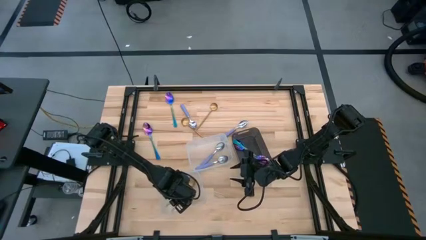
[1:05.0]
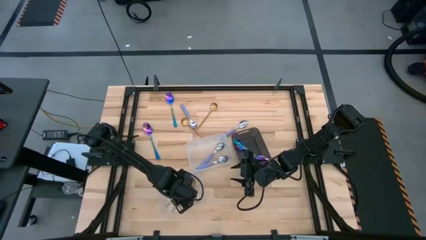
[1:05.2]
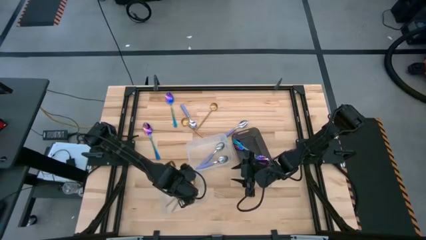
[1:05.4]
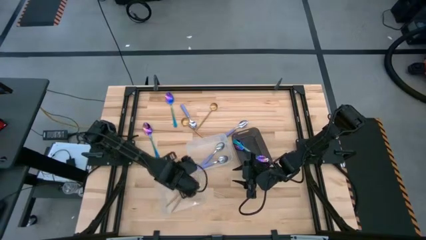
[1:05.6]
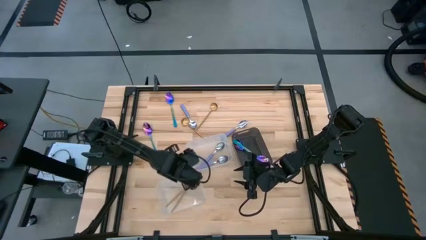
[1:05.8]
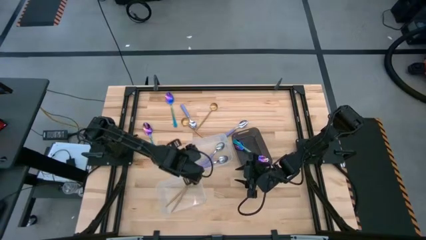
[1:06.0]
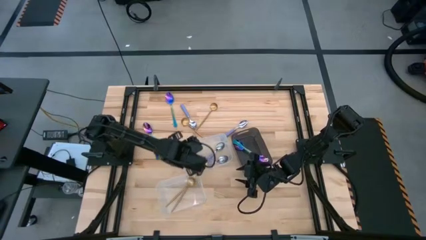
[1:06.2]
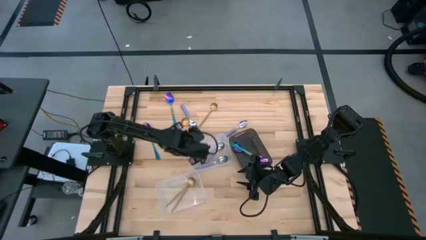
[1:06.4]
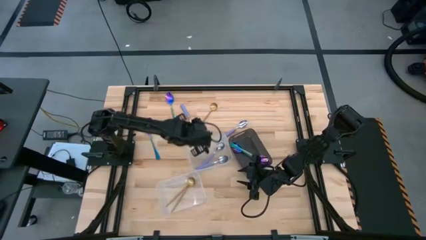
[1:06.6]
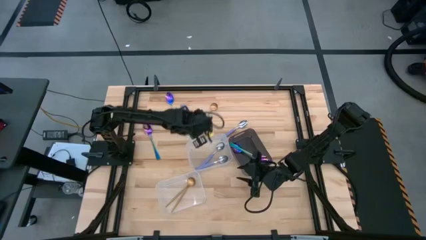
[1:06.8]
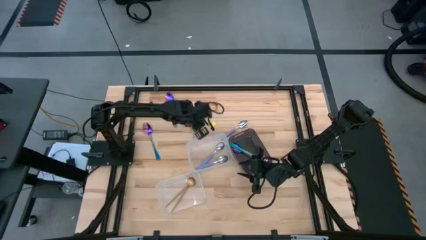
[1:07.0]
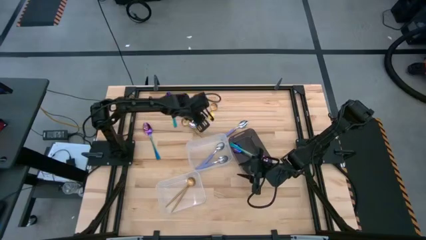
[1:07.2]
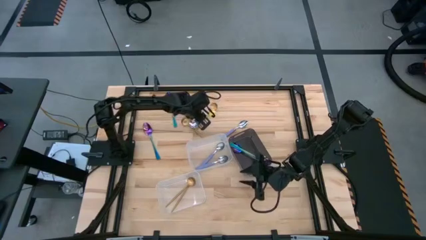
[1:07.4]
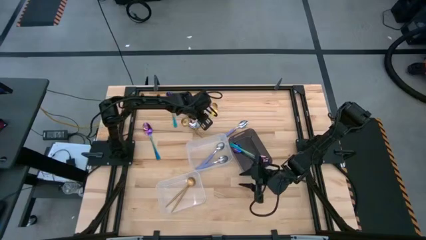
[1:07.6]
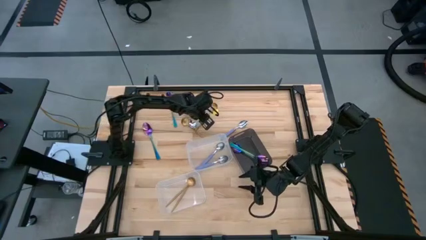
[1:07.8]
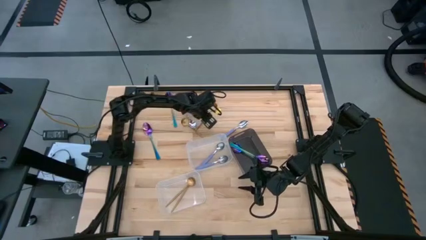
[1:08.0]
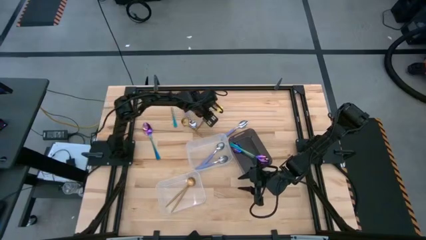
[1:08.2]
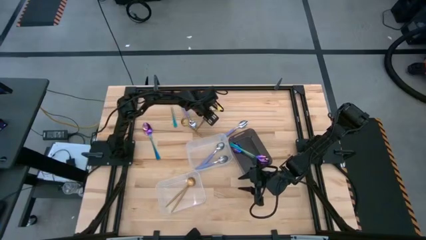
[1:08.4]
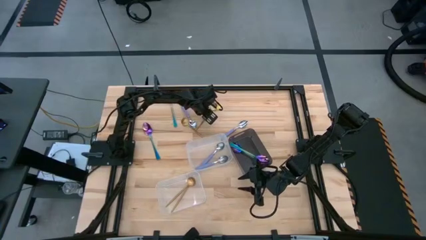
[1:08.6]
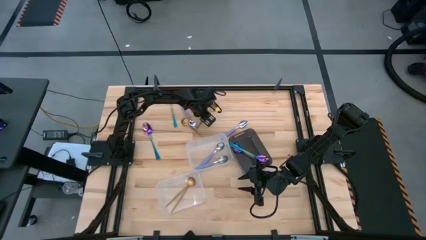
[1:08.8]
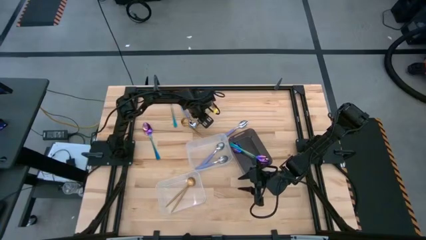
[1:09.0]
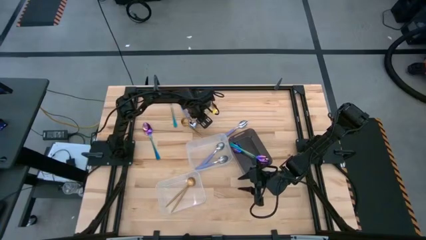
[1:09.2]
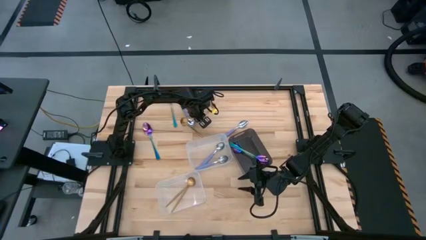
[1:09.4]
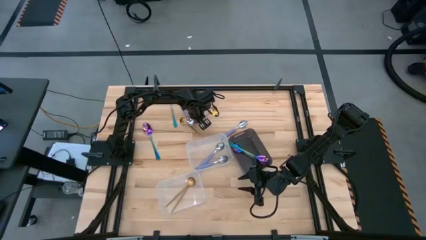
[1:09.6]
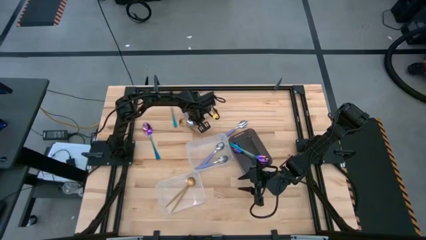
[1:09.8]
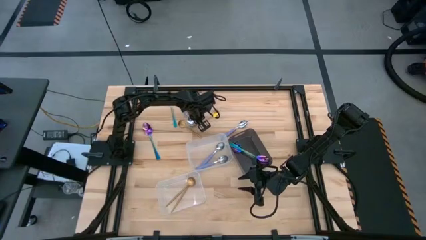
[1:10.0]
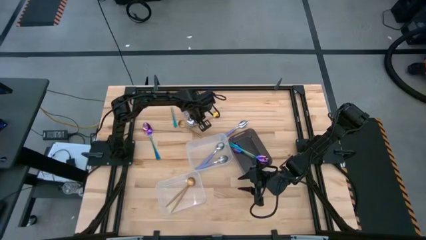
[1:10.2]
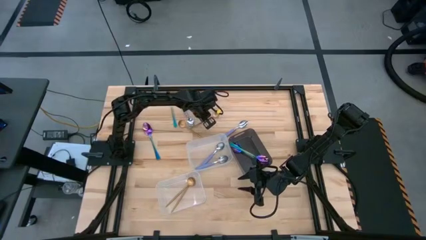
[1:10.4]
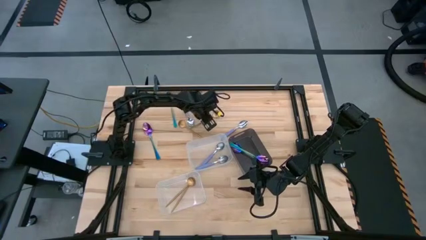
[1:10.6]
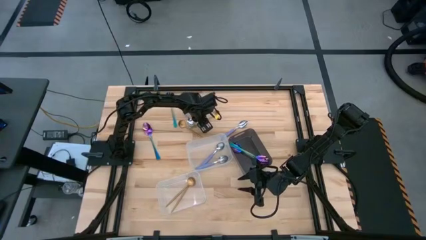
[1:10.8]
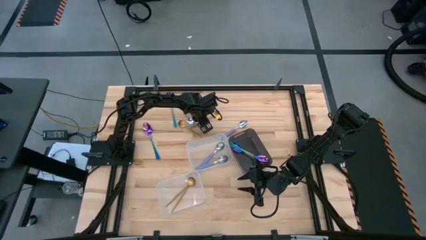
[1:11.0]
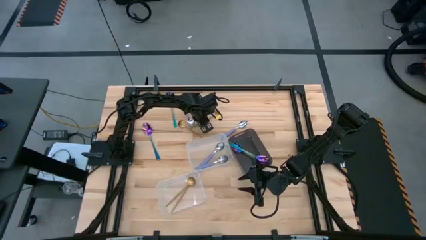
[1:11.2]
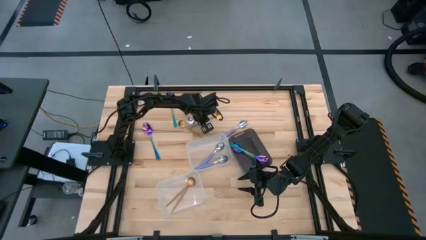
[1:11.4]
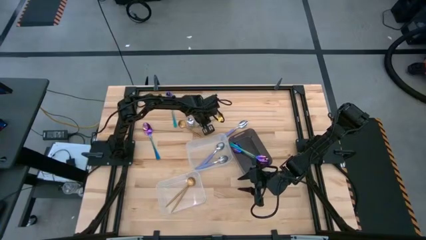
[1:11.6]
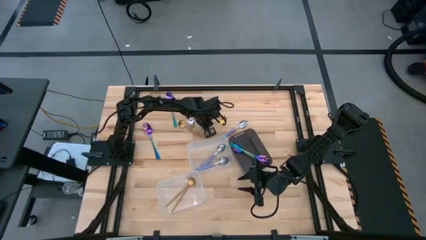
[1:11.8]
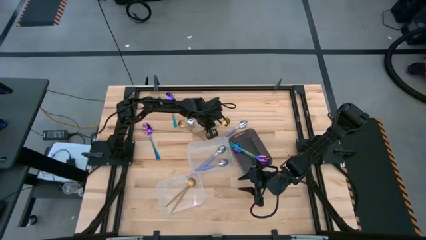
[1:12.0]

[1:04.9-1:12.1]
Task: Sort silverware by color (type)
Put the gold spoon into the bottom transparent bin

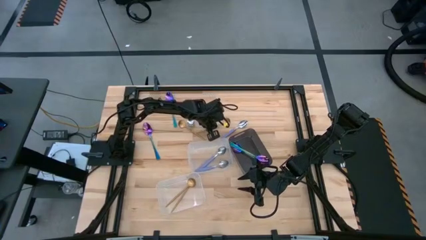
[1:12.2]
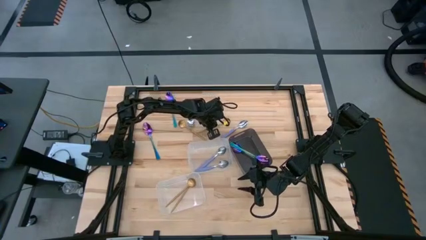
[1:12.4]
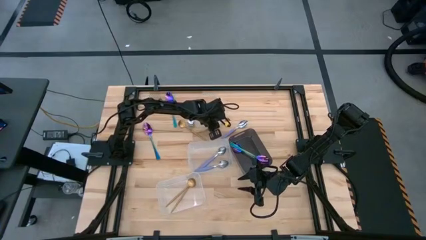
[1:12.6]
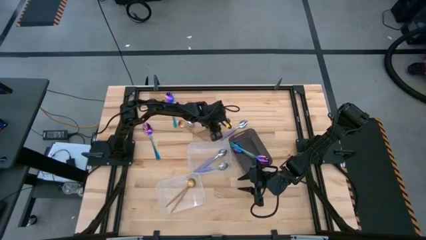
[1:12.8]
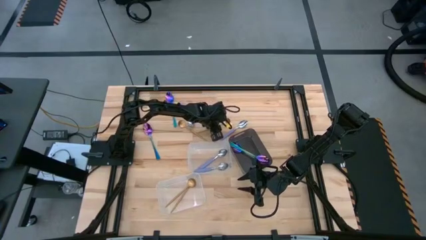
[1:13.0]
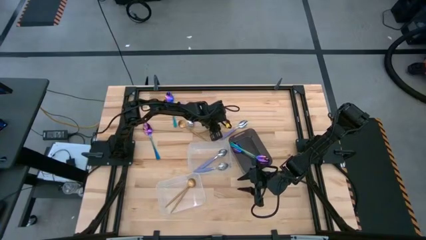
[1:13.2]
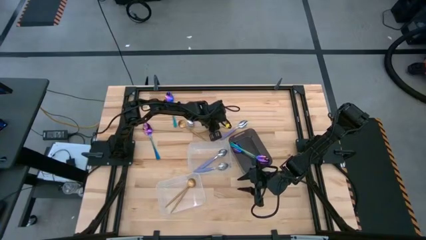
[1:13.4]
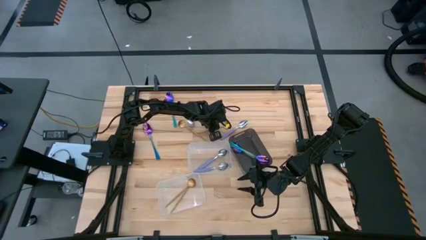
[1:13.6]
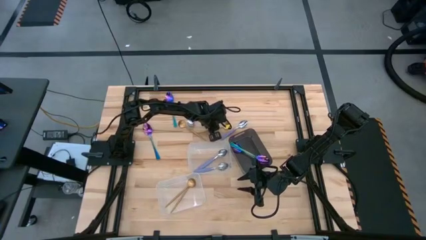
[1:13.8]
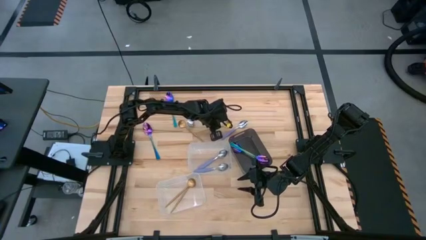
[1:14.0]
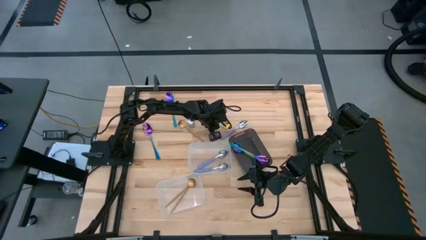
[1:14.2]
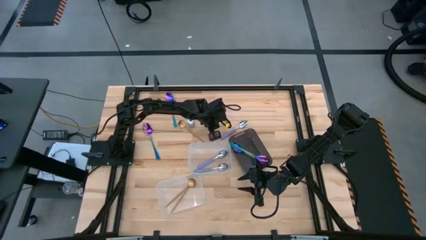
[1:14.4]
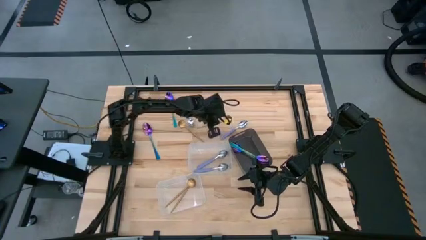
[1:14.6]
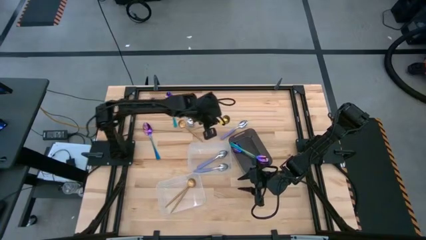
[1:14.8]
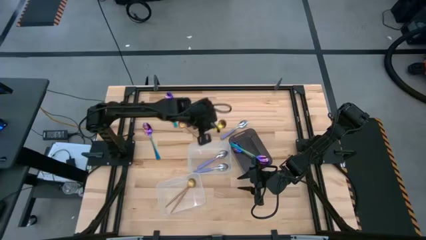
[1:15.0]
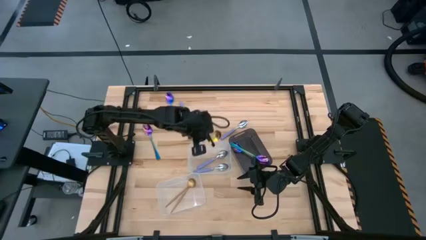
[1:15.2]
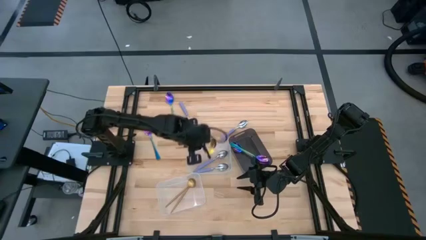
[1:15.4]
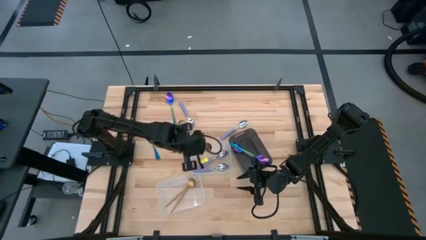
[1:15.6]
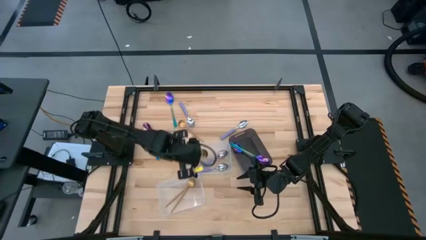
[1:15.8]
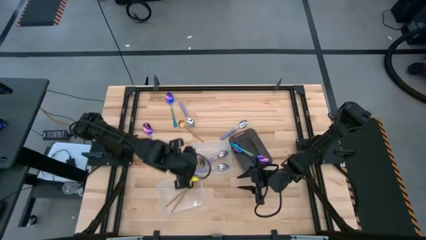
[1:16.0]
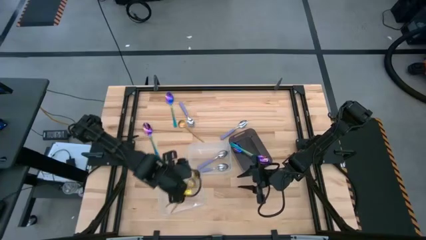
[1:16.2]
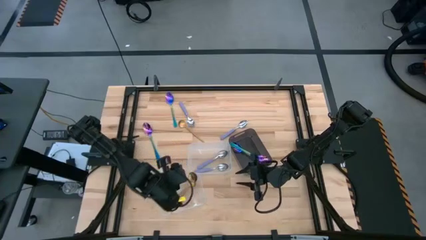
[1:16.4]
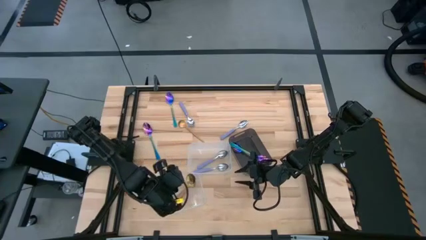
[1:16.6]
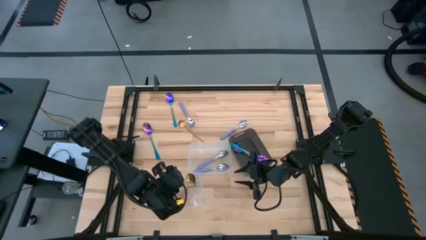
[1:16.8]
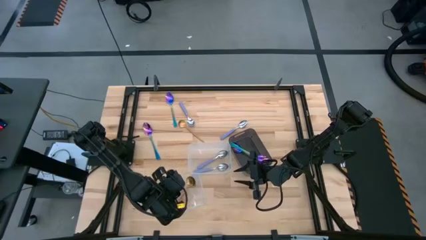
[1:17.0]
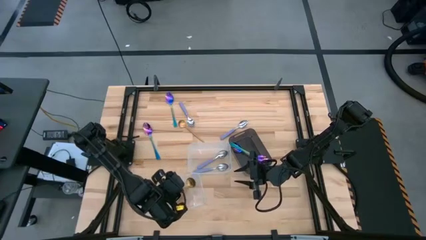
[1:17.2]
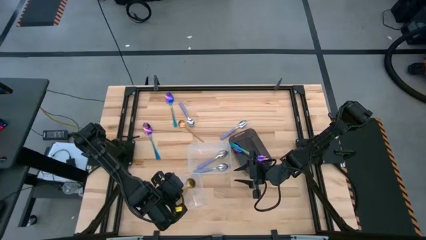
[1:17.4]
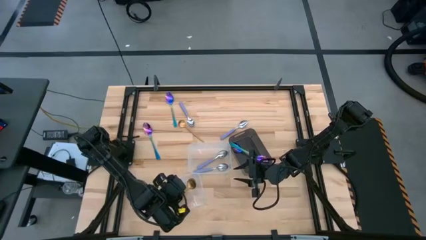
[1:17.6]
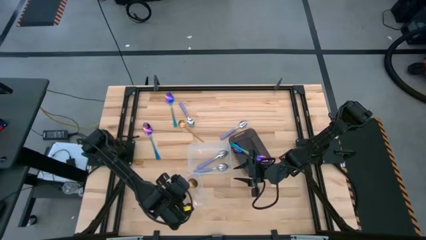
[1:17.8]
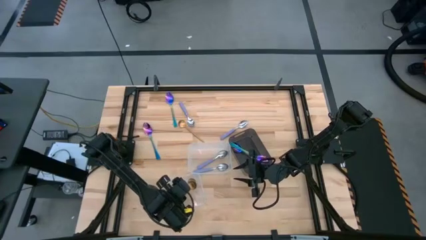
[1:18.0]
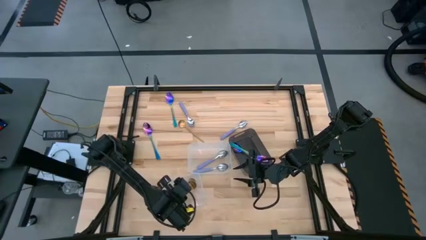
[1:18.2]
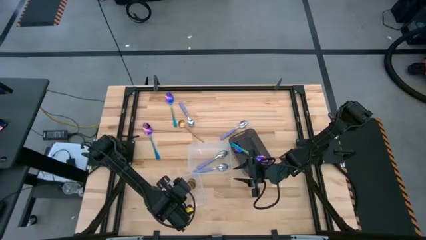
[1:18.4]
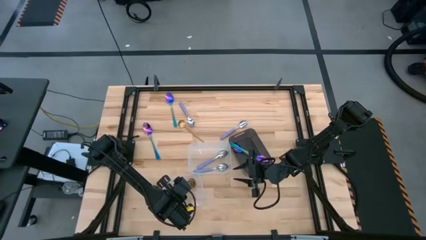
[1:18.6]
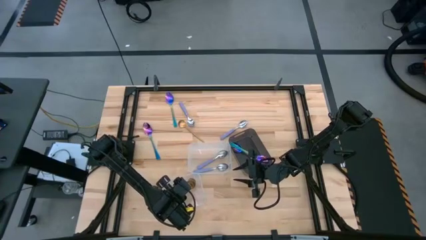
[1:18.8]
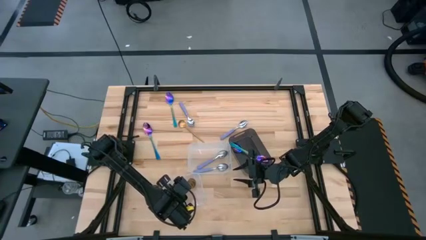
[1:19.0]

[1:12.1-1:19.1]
Put the gold spoon into the bottom transparent bin

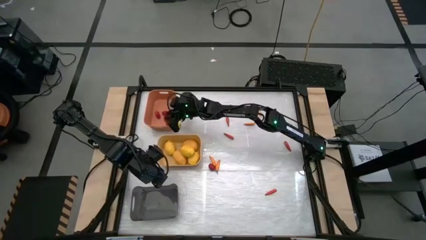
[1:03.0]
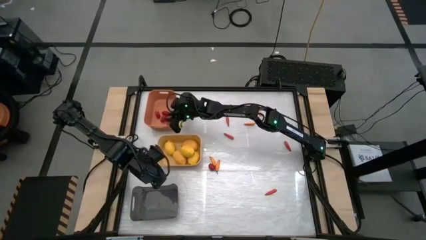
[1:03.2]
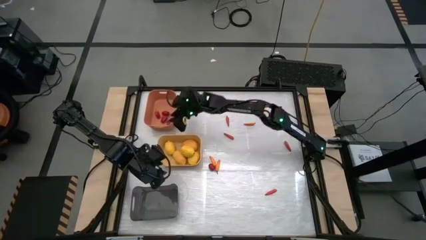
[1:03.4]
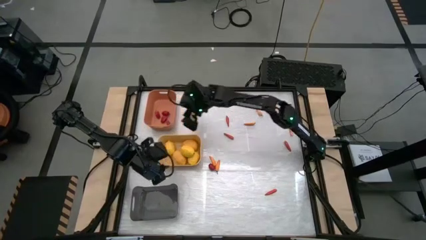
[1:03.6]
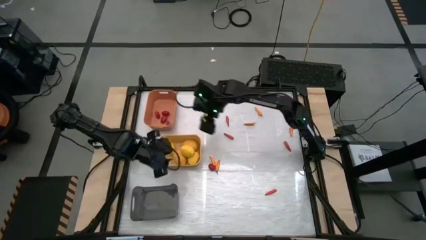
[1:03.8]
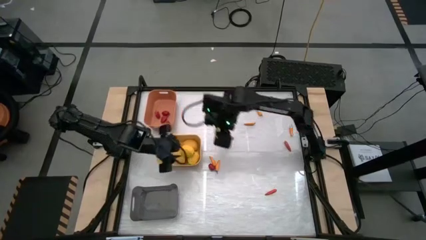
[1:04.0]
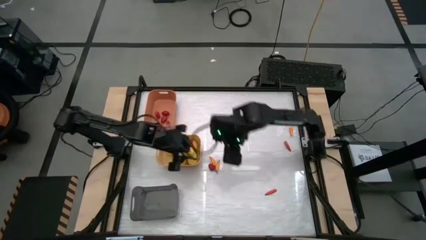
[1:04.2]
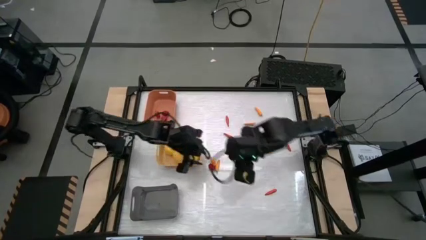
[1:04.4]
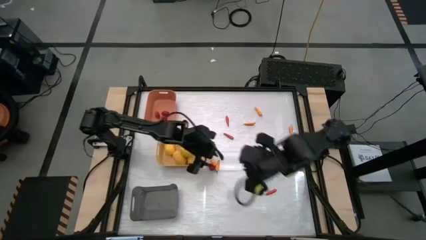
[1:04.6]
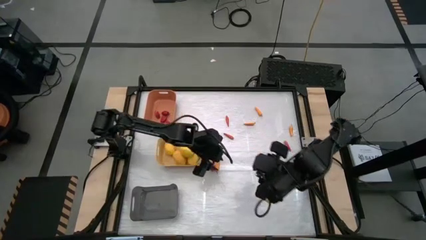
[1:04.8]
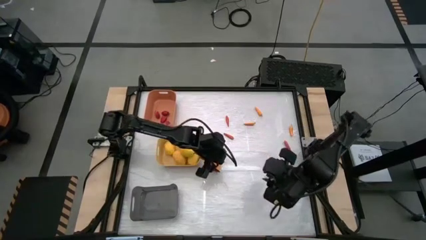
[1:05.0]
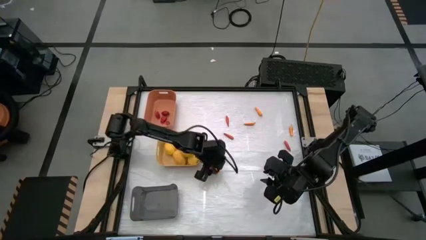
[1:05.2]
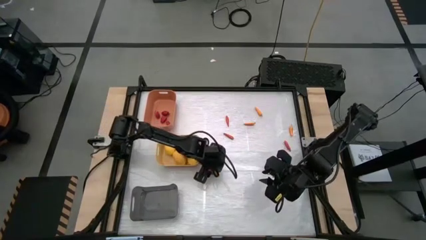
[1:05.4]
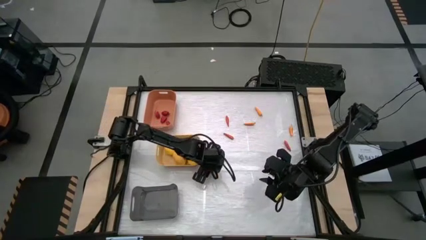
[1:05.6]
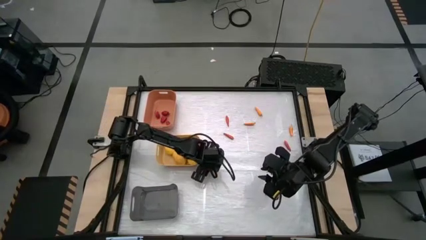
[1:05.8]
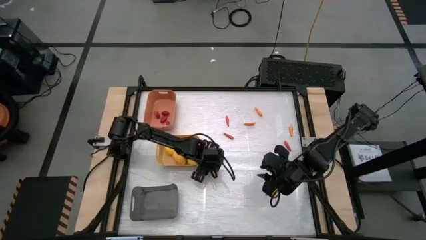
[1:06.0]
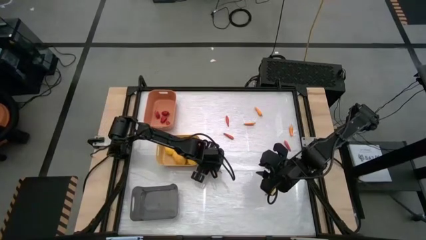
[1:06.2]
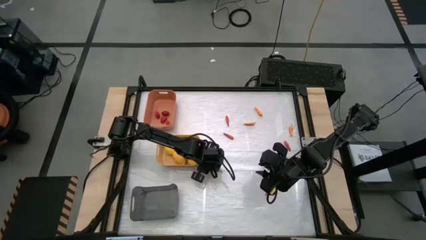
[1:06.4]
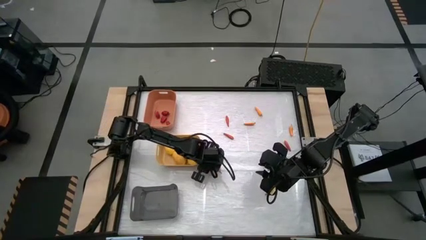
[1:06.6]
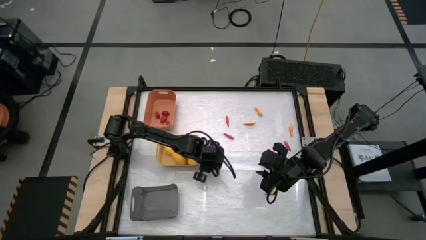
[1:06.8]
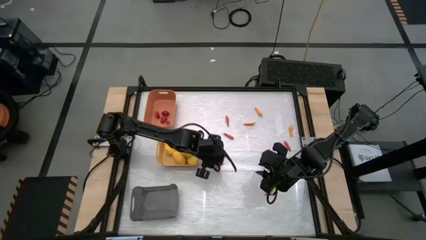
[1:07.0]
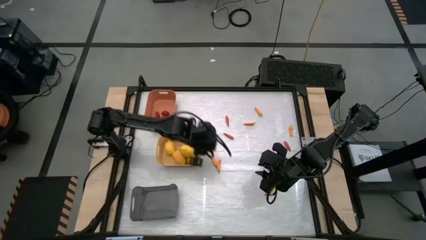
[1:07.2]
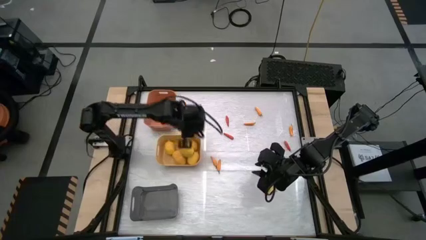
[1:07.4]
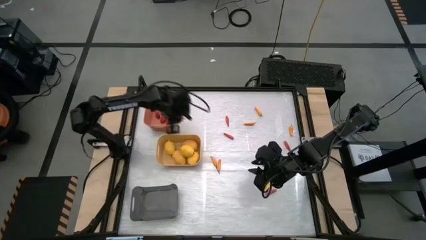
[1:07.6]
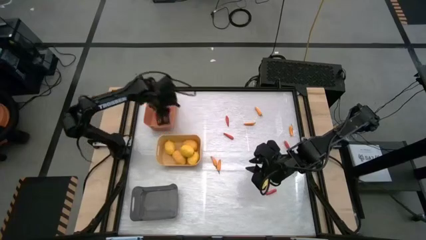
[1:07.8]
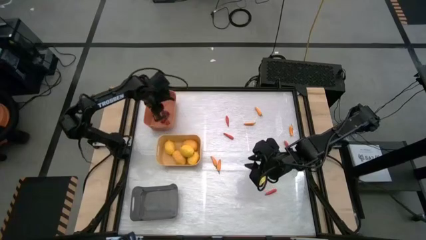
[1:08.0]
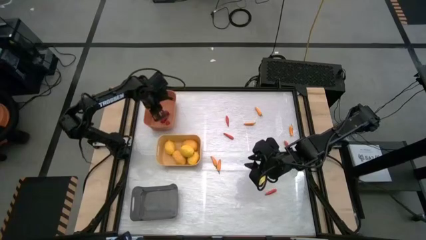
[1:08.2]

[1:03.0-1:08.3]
Task: Sort produce into baskets
Put the red chili pepper into the orange bin
